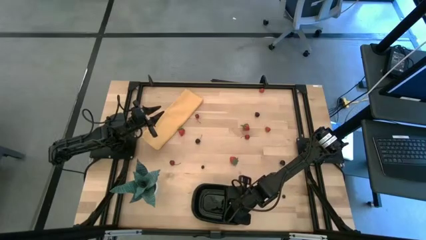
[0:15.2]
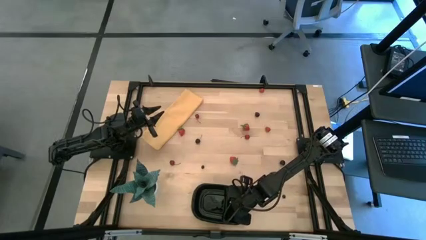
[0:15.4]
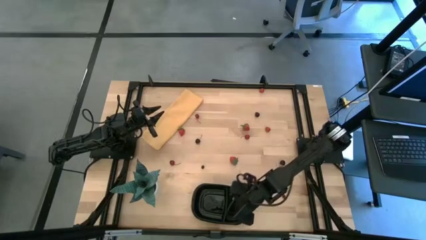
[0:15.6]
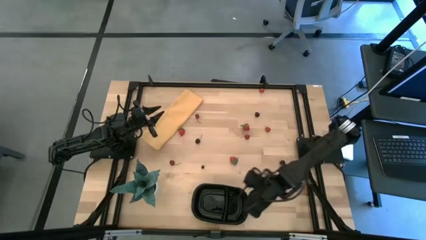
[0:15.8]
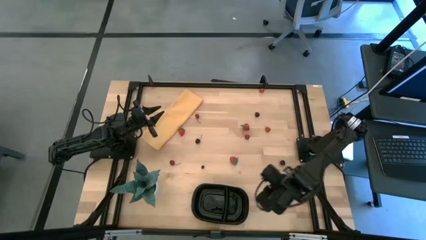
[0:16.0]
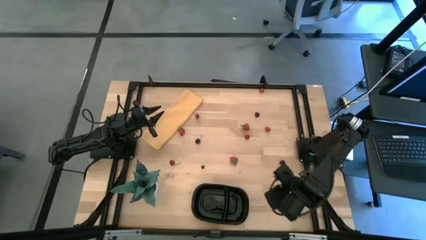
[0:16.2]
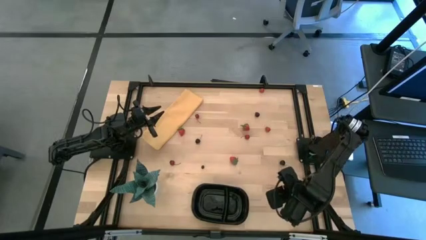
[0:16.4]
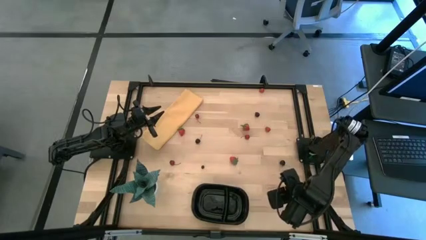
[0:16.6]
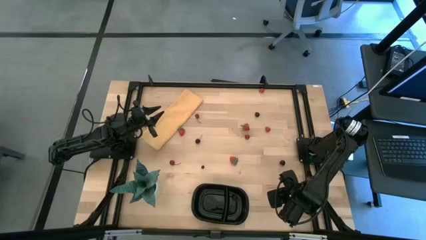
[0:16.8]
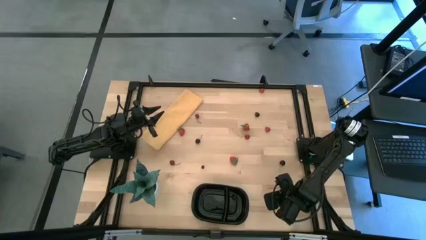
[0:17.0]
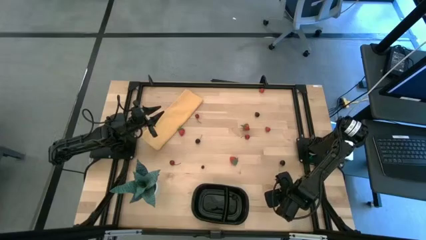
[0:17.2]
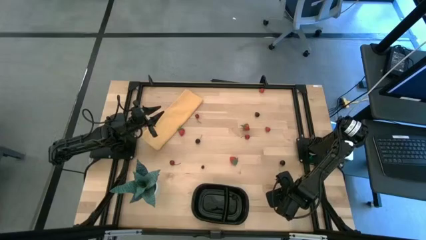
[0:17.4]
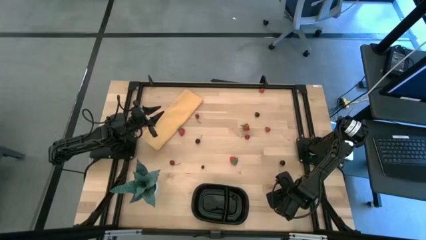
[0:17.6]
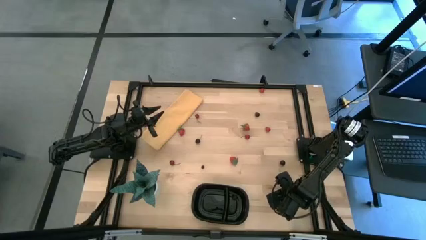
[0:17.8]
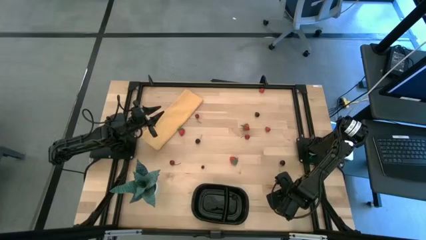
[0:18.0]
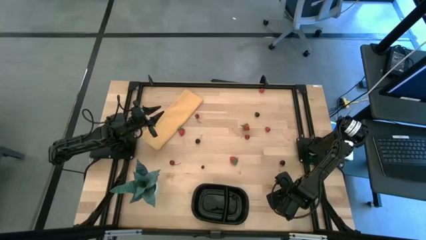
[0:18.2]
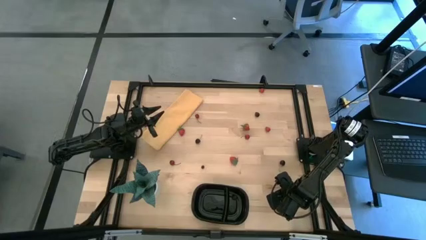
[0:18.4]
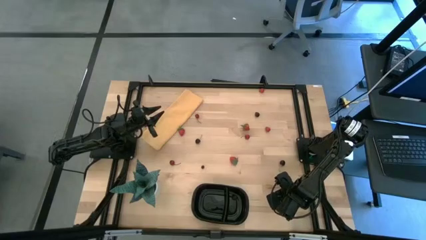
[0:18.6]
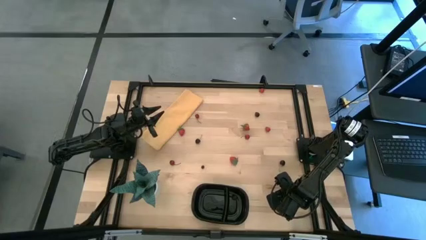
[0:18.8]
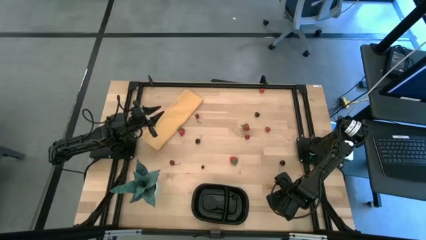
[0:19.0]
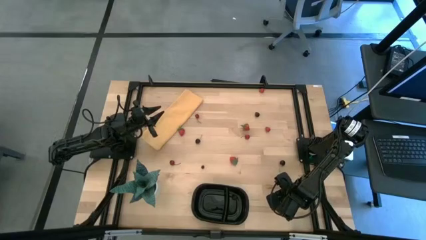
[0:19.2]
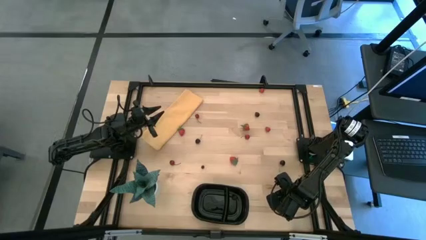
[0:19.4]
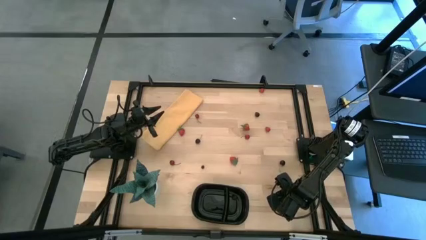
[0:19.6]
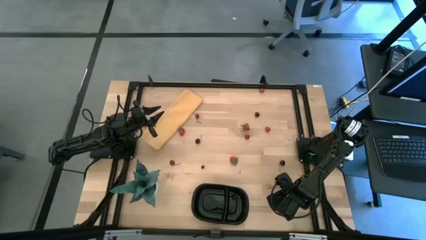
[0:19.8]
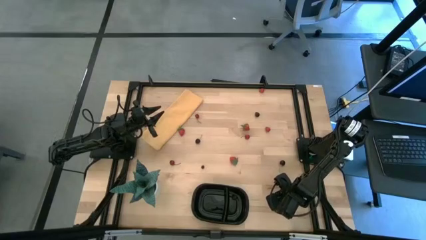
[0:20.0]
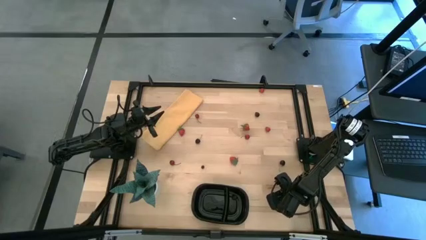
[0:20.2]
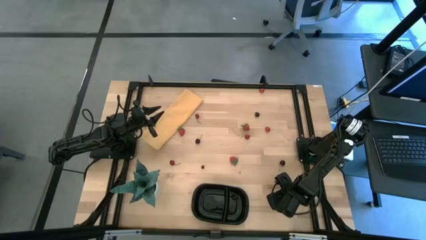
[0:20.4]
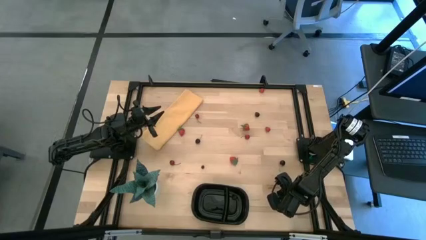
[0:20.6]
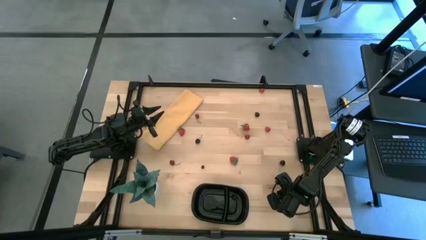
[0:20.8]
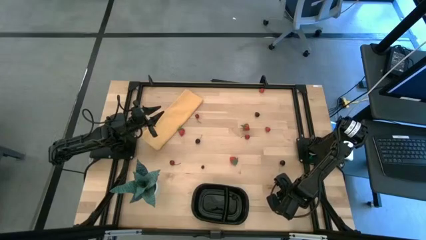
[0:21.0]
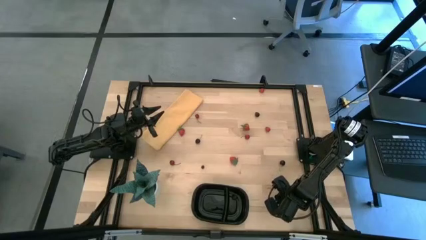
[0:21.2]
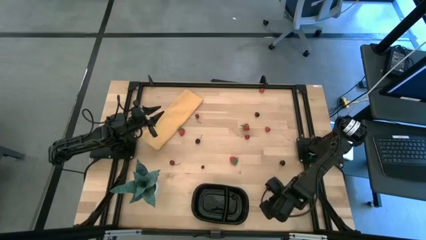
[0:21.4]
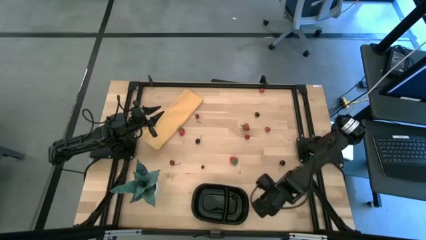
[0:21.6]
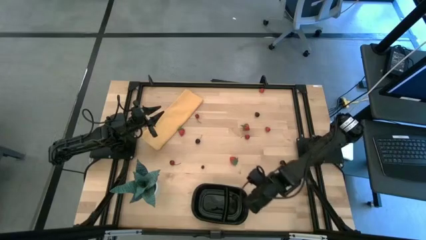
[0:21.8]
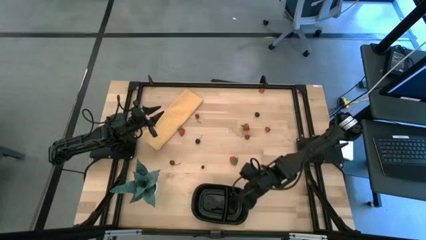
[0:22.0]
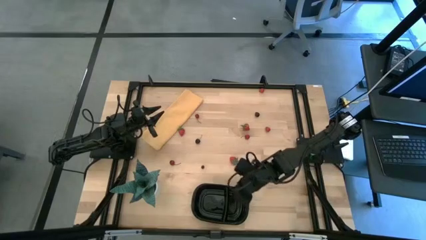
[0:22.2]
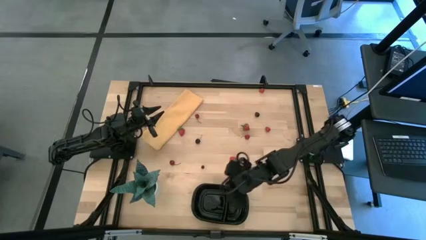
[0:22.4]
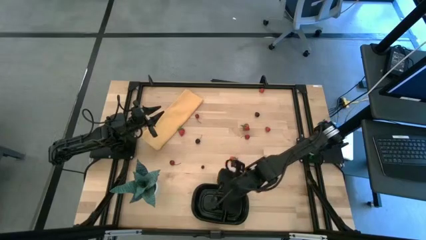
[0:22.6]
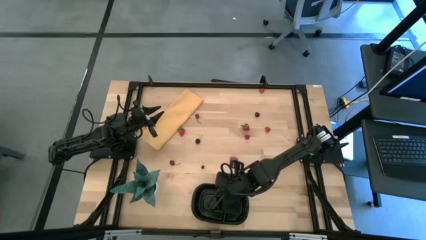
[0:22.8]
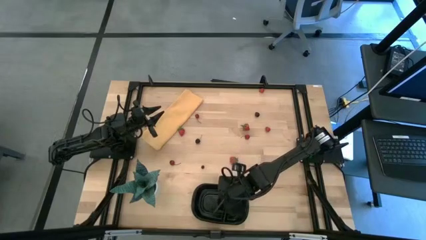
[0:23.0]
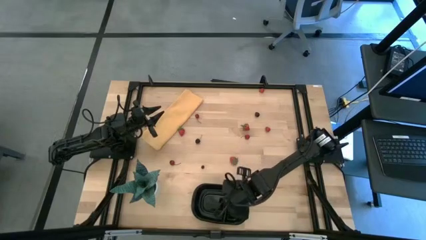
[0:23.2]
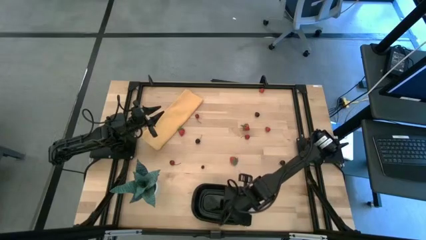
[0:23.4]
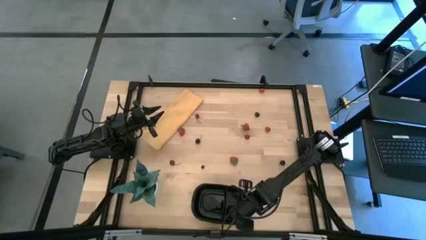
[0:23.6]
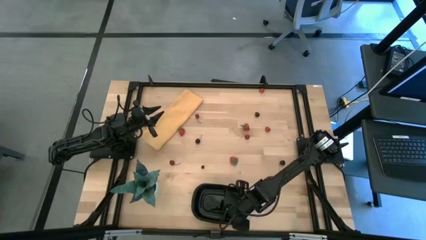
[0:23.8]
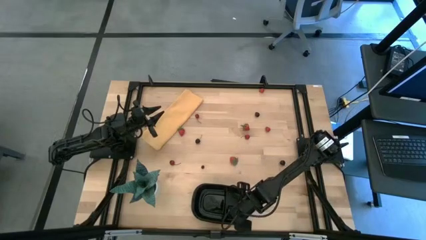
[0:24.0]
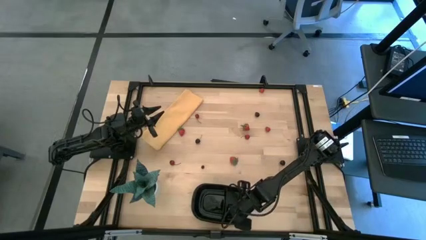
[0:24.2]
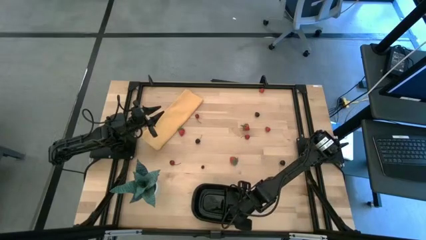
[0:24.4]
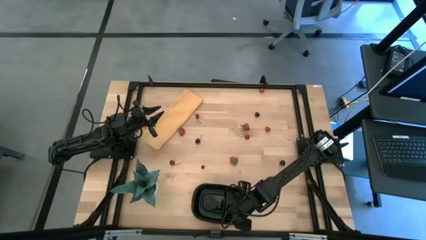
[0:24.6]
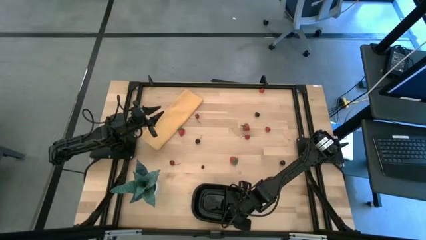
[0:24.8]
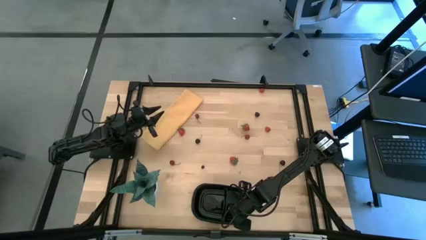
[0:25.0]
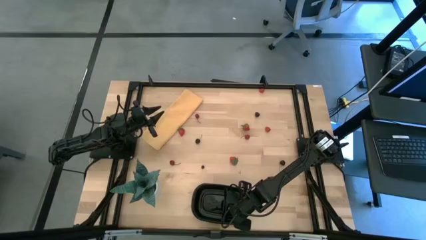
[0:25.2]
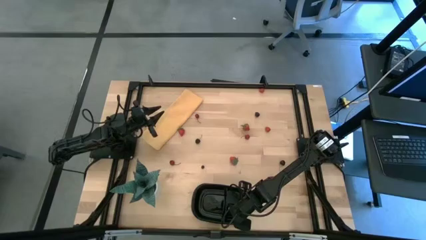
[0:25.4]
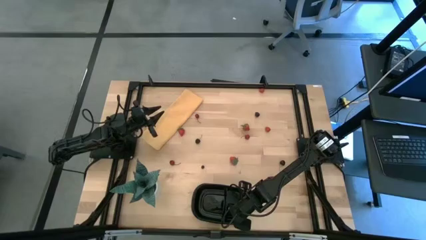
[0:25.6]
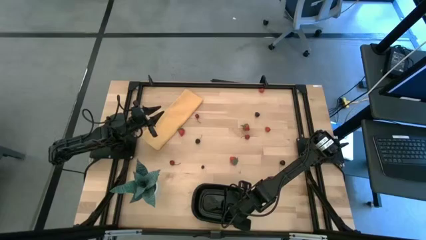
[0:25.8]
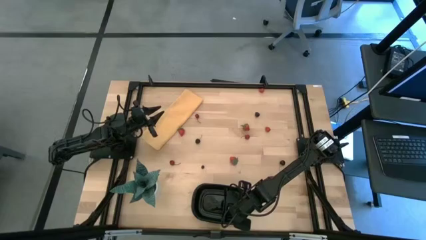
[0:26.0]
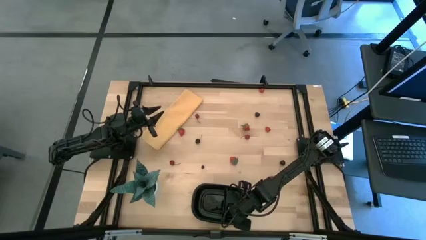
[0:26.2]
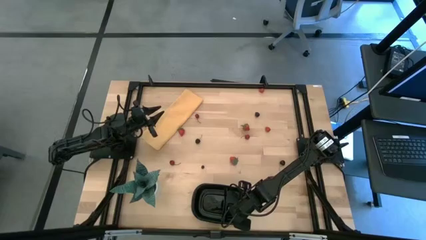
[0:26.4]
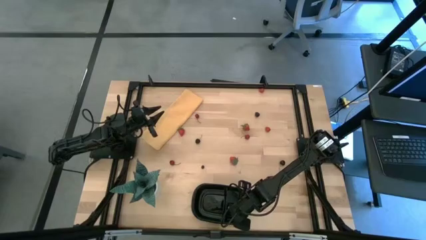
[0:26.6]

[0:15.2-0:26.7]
Task: Pick and placing Produce into tupperware
Put the right blueberry into the black container
